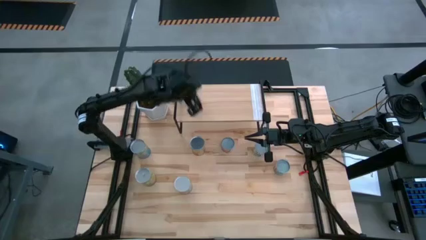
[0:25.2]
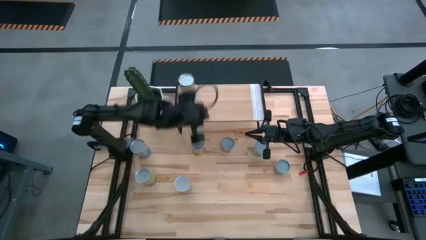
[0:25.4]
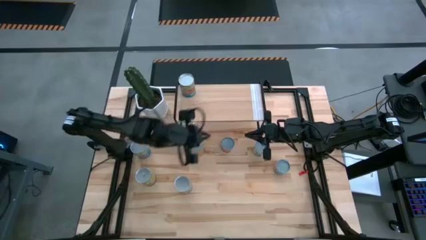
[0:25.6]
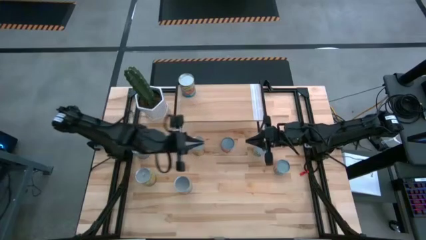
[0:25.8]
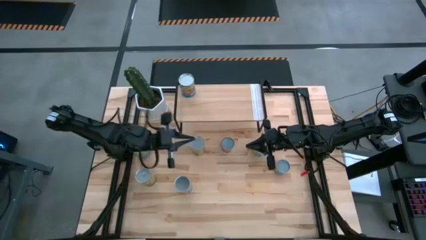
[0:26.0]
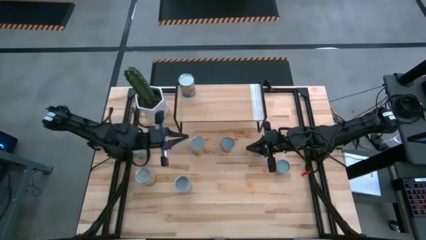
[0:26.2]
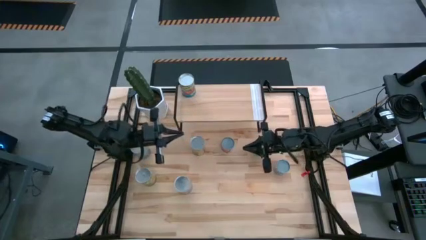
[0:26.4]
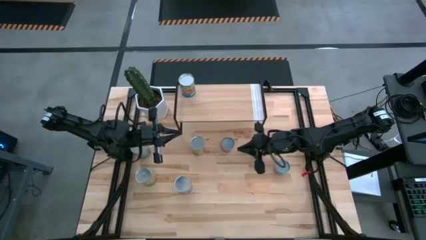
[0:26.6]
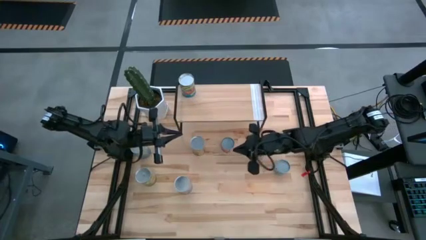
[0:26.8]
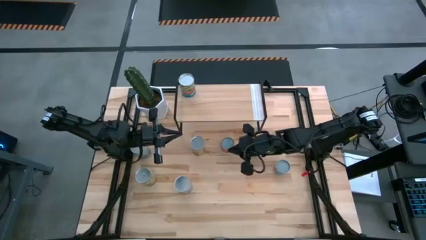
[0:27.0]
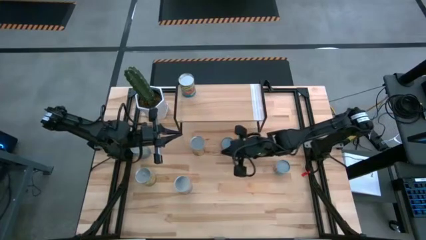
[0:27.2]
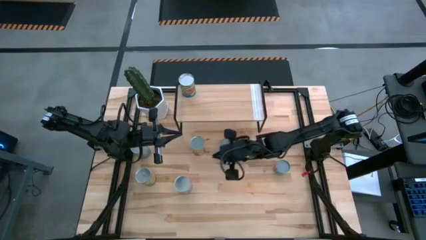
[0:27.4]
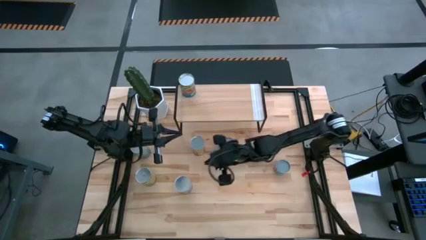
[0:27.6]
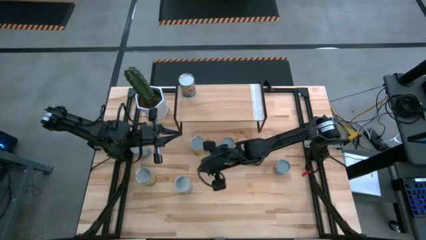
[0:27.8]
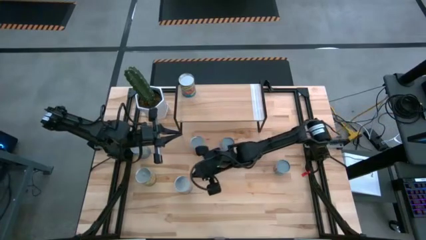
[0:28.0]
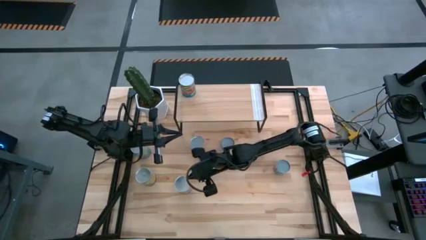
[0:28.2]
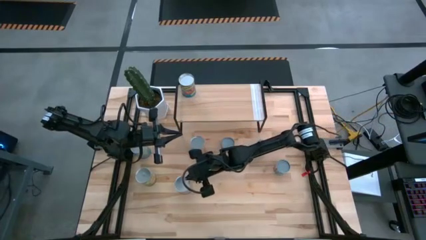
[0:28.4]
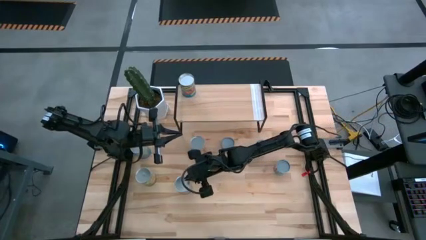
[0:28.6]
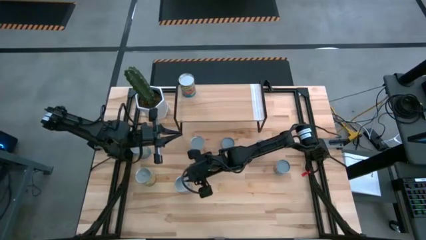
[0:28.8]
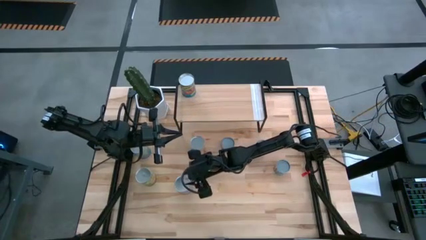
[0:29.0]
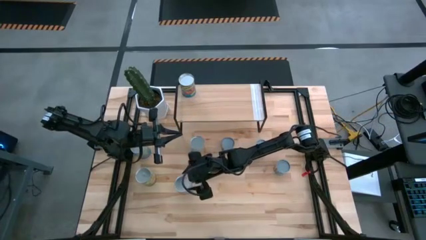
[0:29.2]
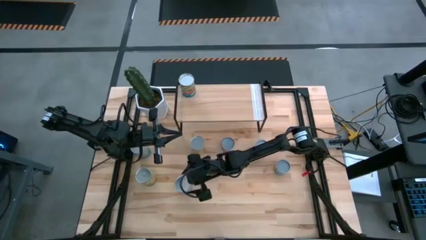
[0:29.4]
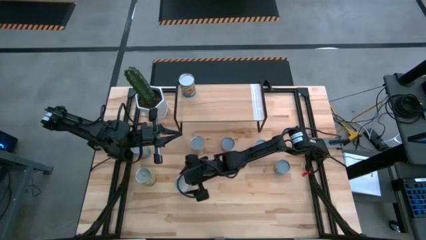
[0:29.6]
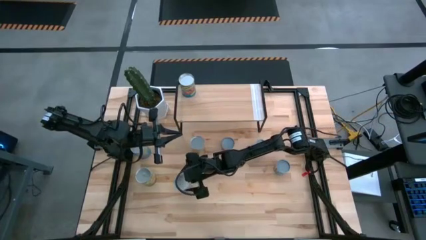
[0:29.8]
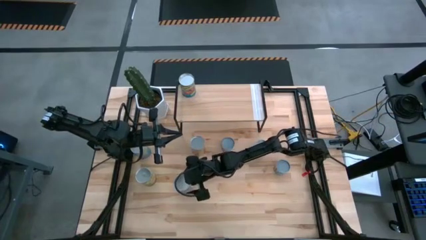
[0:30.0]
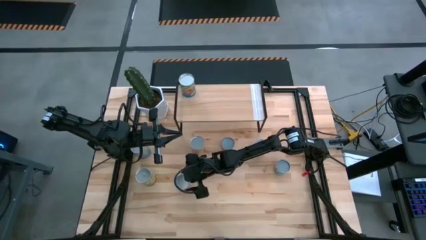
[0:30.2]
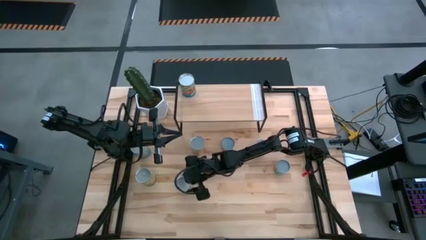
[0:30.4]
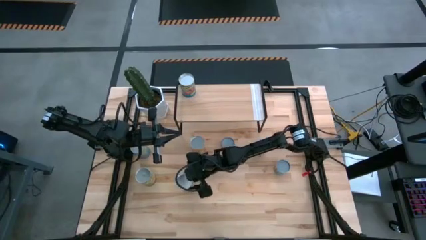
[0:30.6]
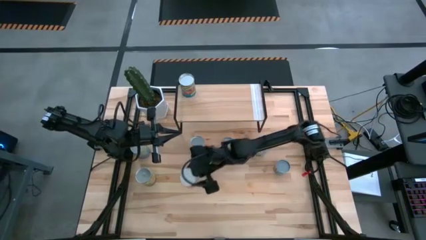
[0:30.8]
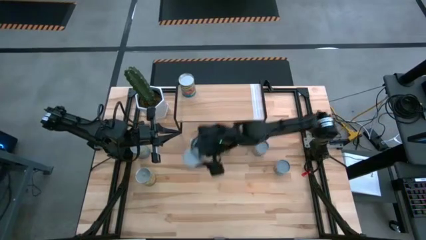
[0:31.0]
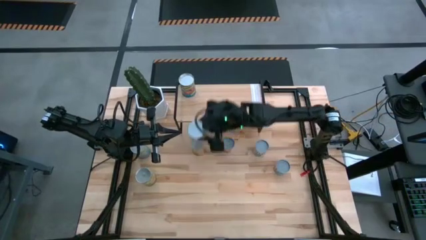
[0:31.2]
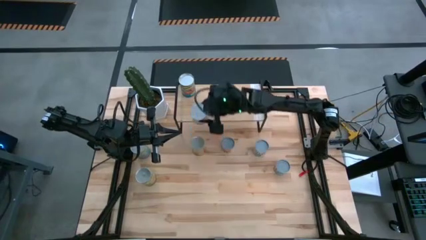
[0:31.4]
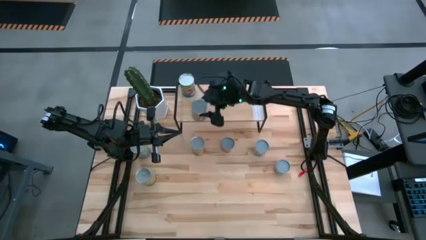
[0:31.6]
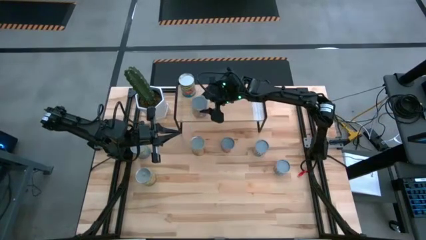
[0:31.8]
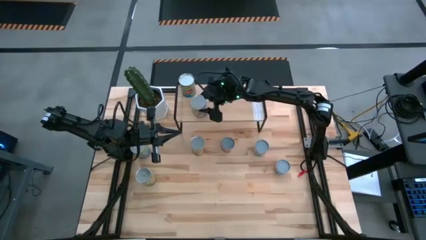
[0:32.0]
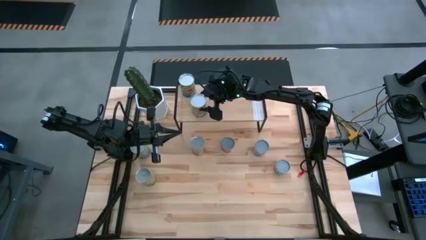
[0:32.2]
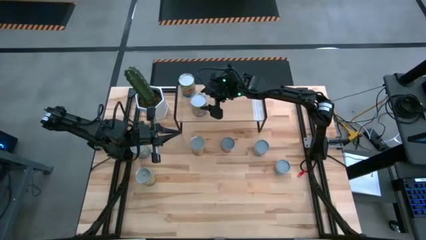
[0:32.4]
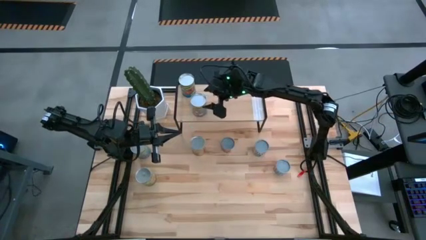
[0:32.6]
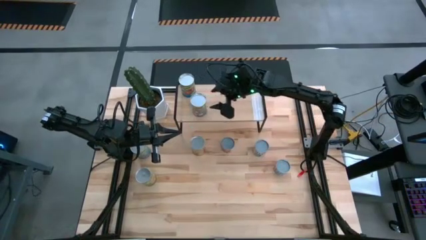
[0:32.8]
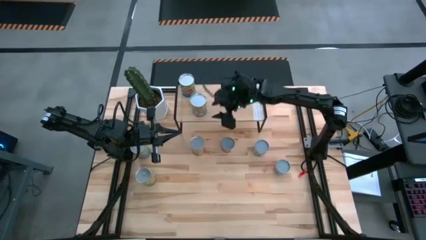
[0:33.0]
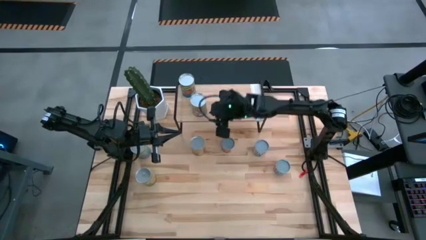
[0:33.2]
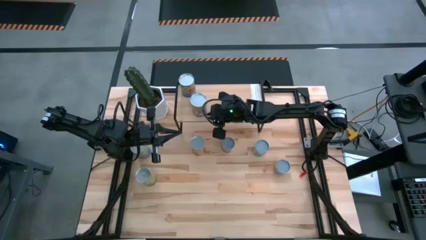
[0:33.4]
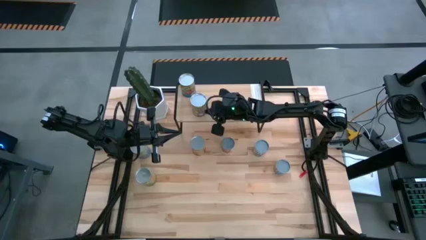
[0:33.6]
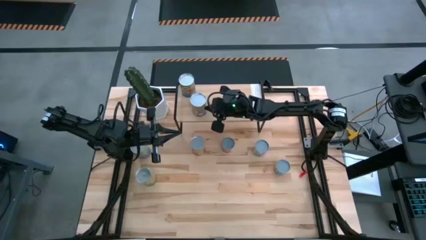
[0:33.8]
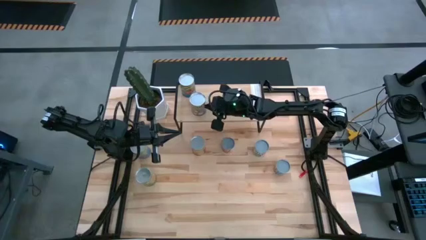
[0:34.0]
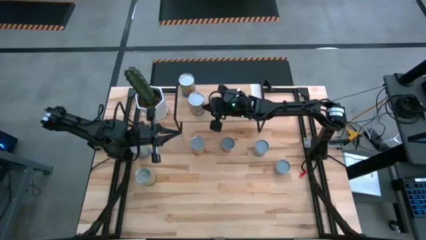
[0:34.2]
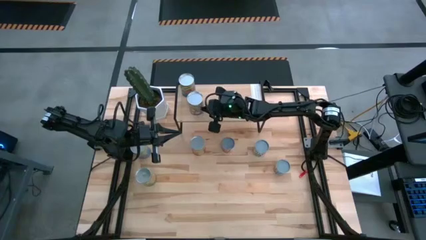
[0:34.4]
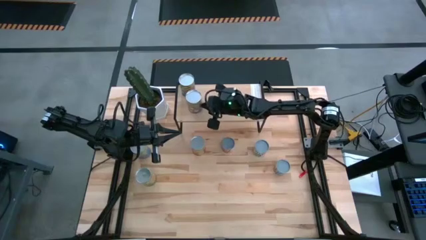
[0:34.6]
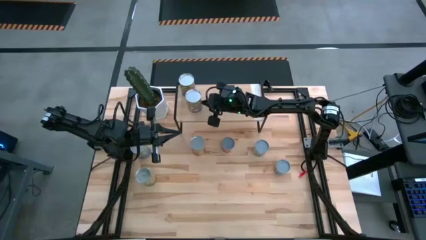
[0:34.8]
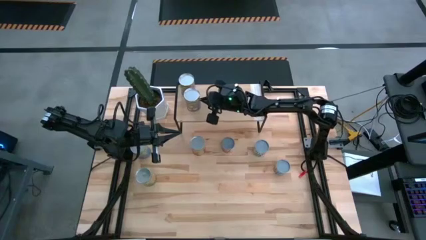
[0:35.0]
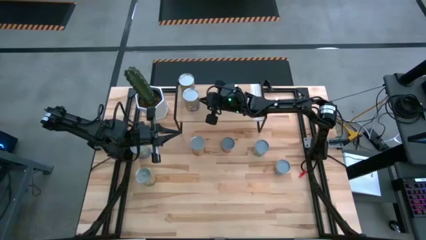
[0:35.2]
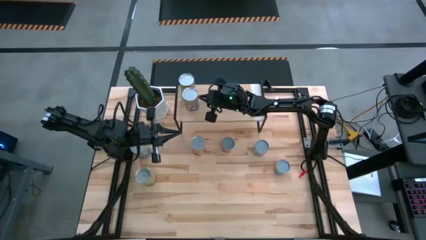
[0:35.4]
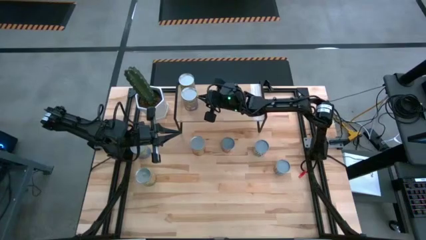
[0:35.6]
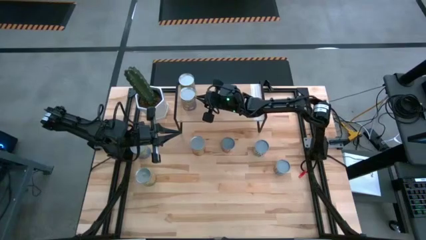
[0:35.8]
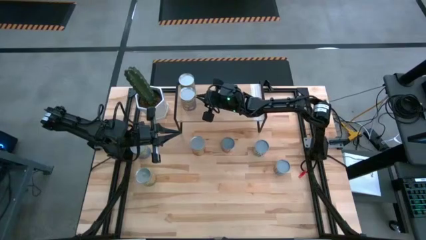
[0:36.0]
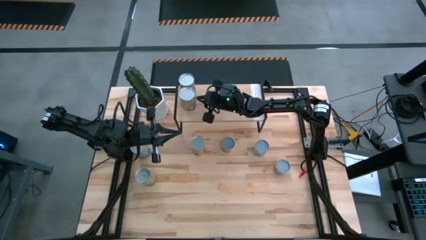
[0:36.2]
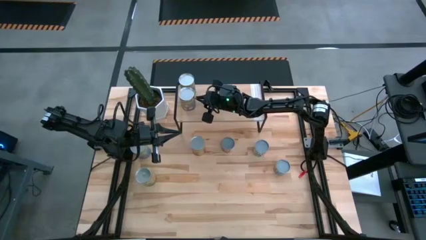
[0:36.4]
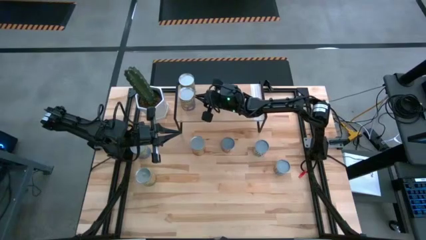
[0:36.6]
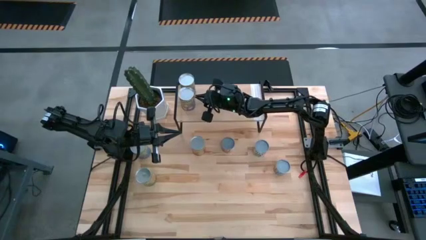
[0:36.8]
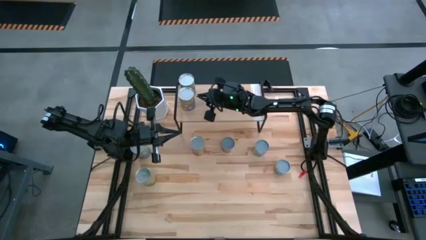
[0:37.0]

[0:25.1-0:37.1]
Task: Pick and place cans onto a shelf
Put the canned peaches on the shelf

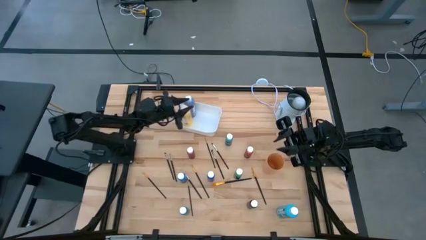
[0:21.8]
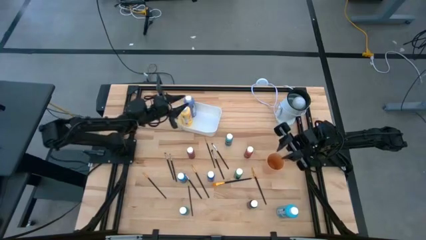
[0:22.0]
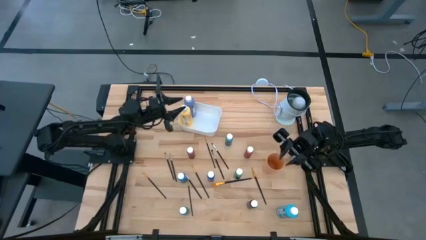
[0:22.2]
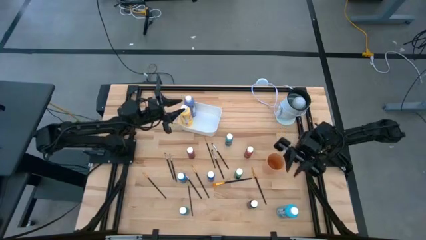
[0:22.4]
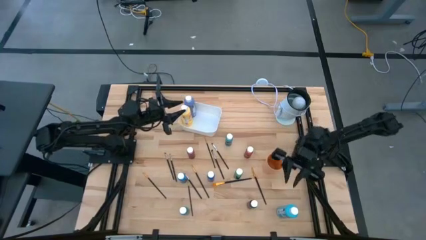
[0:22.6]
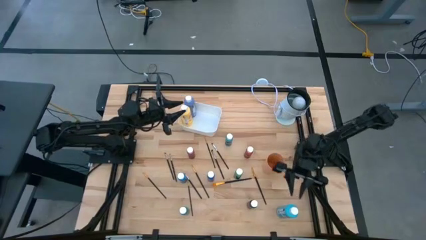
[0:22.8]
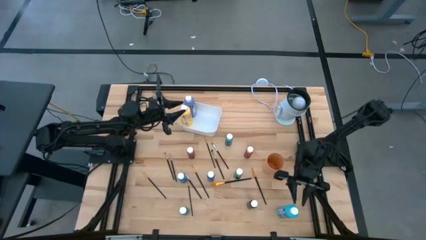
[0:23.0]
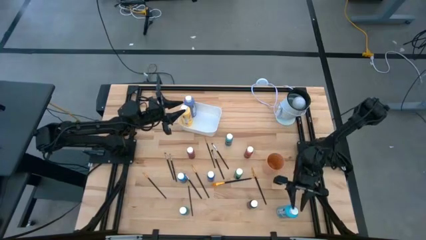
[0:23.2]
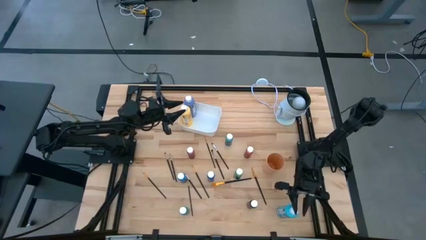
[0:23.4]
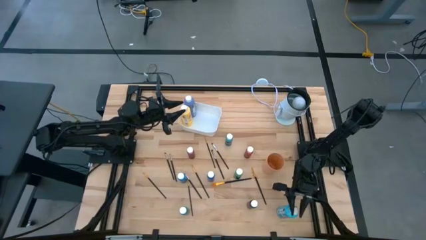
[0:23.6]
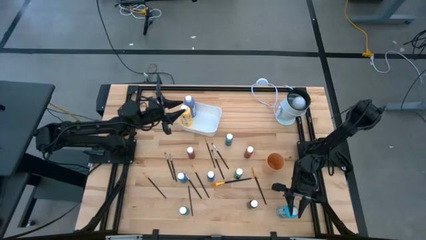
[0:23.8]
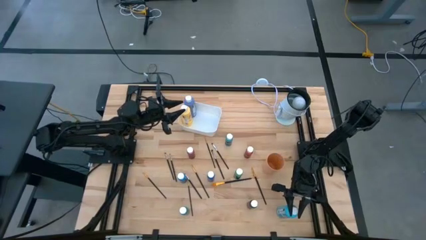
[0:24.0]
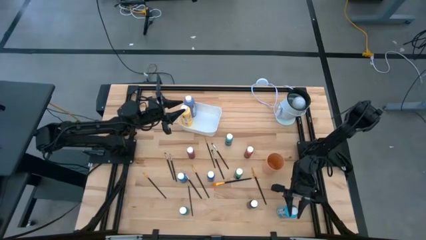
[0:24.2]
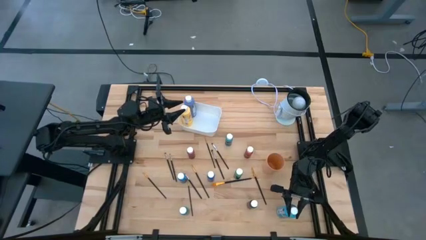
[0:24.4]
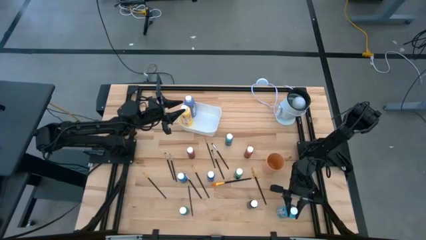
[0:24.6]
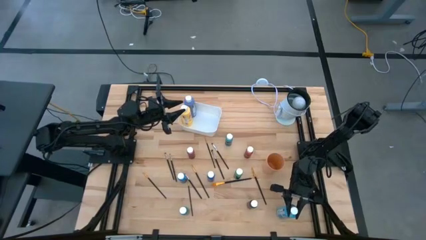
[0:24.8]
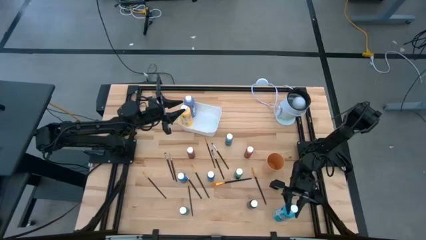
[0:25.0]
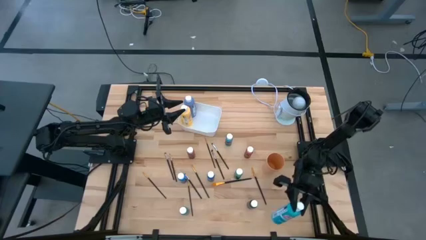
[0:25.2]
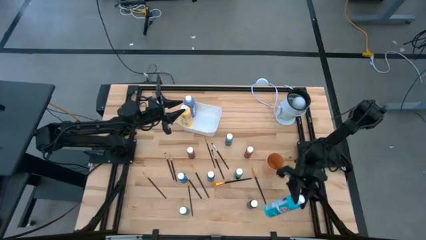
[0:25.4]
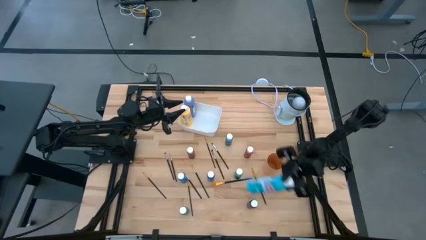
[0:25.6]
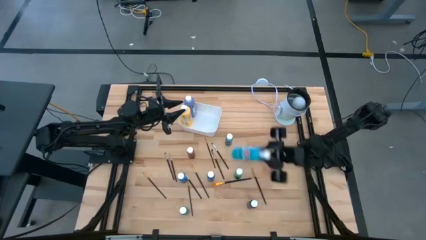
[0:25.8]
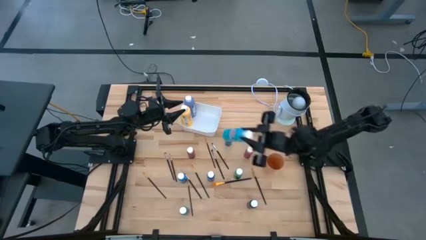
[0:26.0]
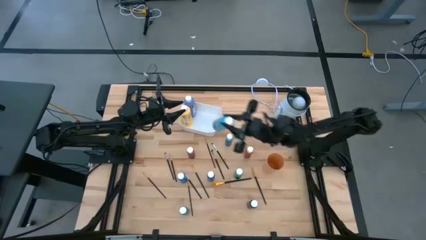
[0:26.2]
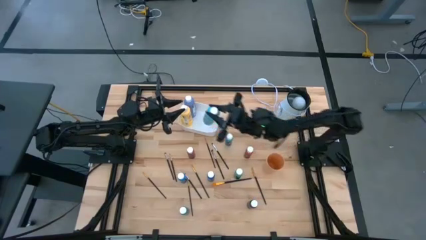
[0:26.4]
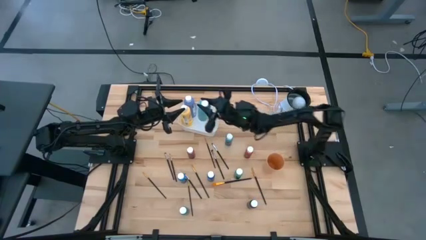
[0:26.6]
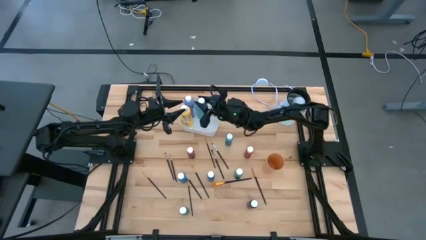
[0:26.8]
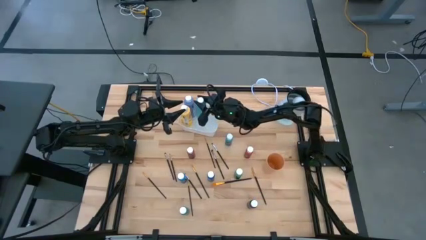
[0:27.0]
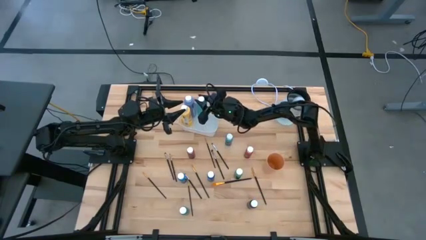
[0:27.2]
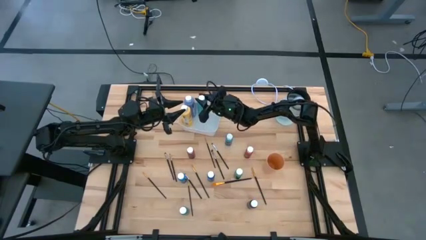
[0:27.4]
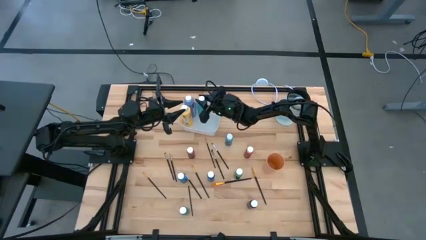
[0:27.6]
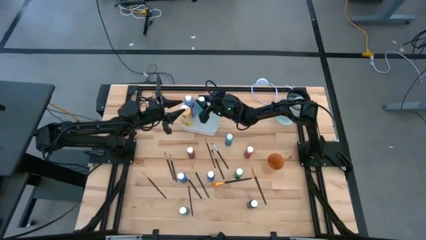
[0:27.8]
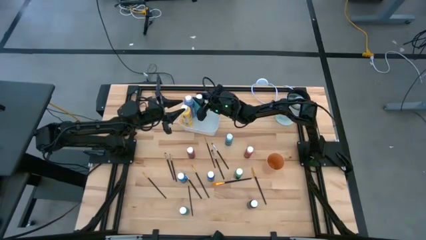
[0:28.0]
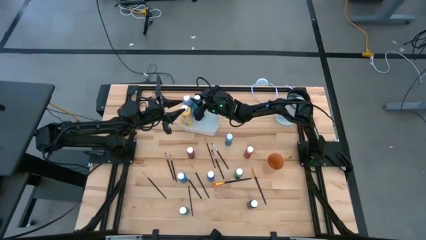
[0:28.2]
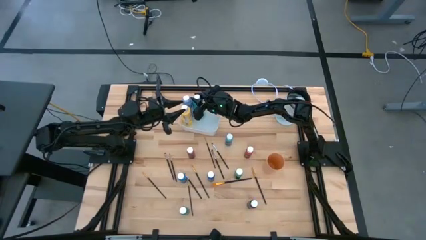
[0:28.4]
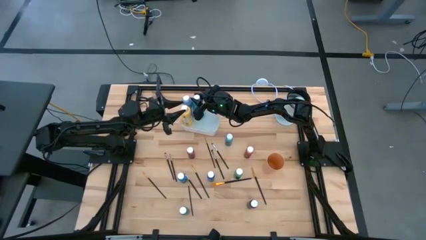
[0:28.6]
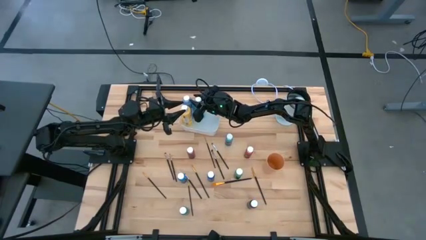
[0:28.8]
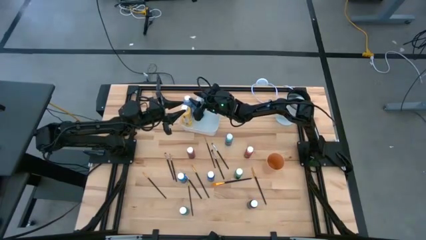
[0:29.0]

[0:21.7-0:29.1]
Task: Pick & Place Paint Supplies
Put the large light blue paint bottle into the white bin
